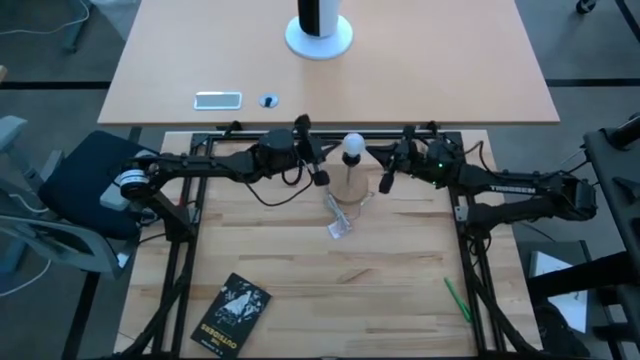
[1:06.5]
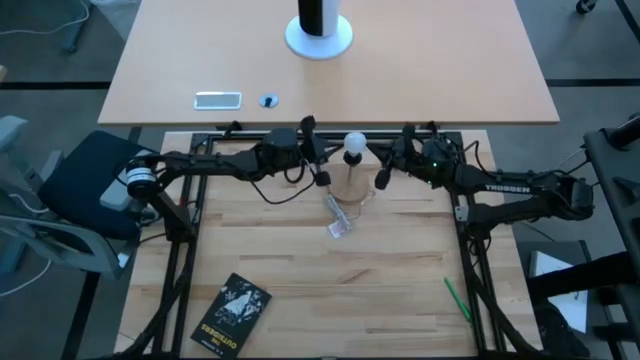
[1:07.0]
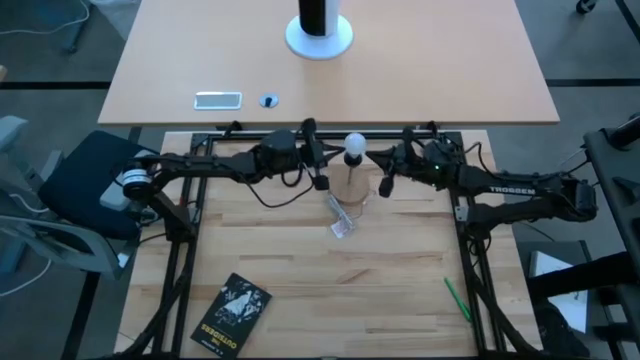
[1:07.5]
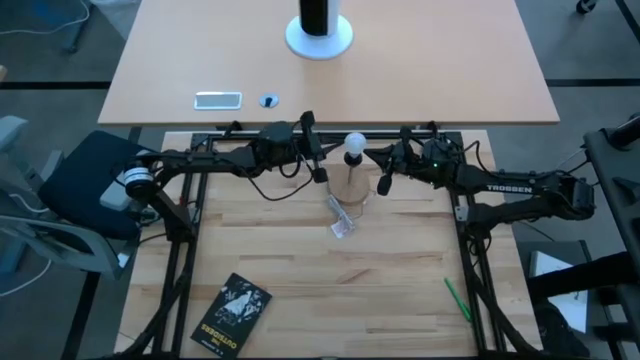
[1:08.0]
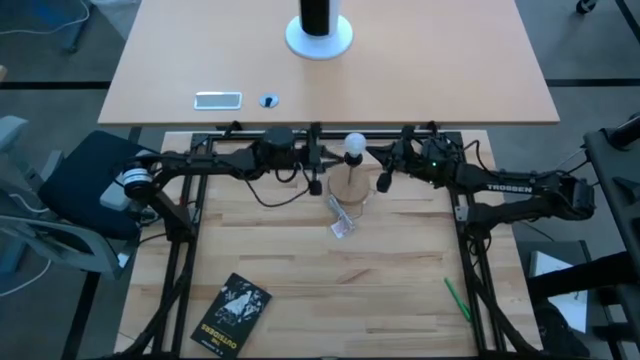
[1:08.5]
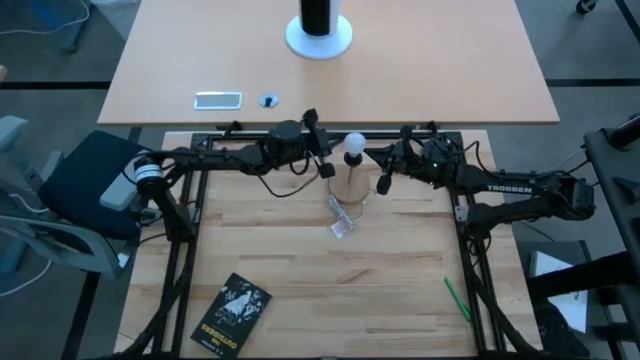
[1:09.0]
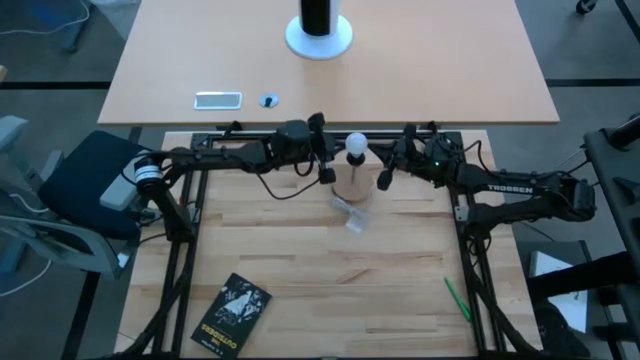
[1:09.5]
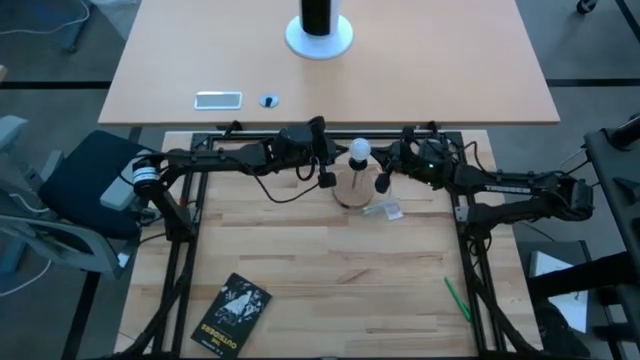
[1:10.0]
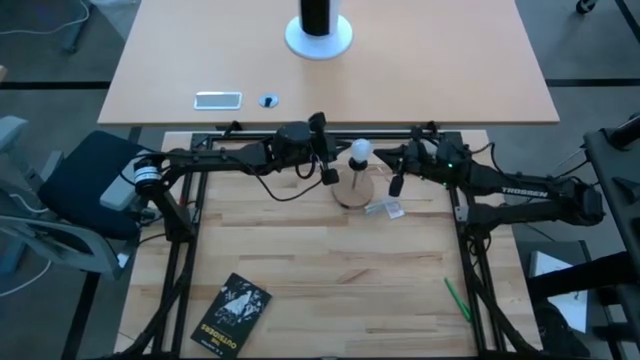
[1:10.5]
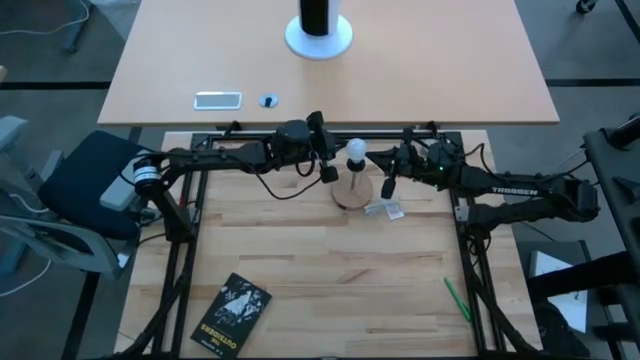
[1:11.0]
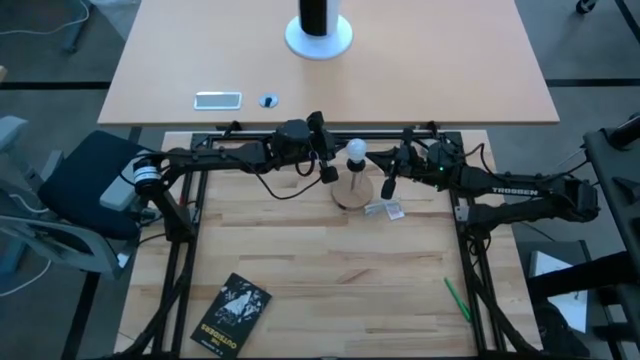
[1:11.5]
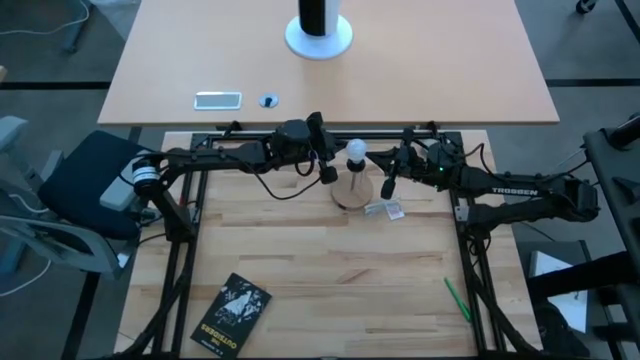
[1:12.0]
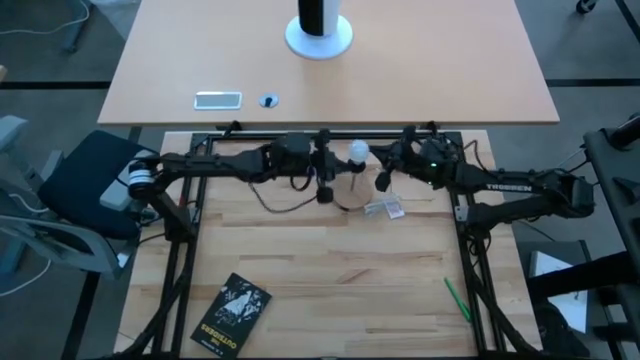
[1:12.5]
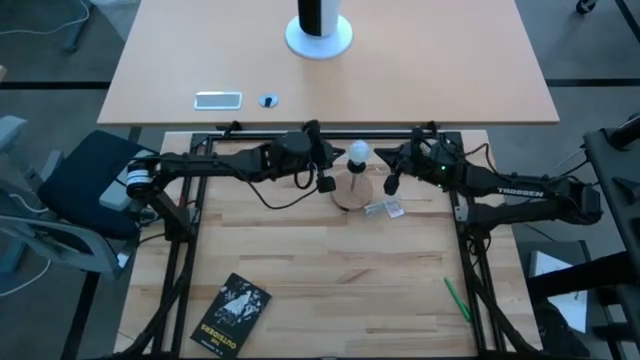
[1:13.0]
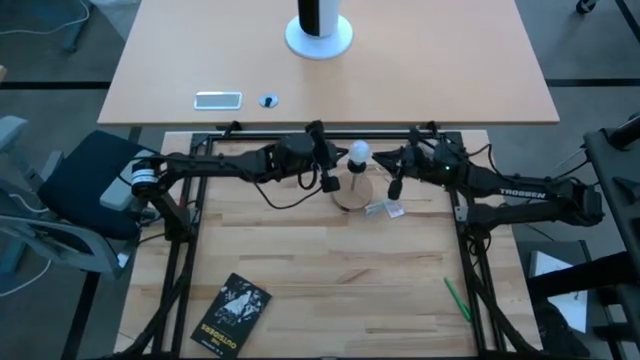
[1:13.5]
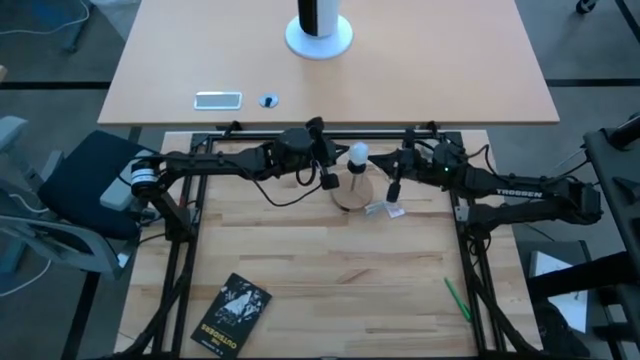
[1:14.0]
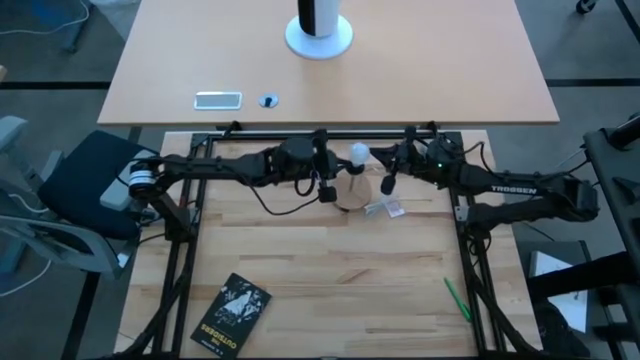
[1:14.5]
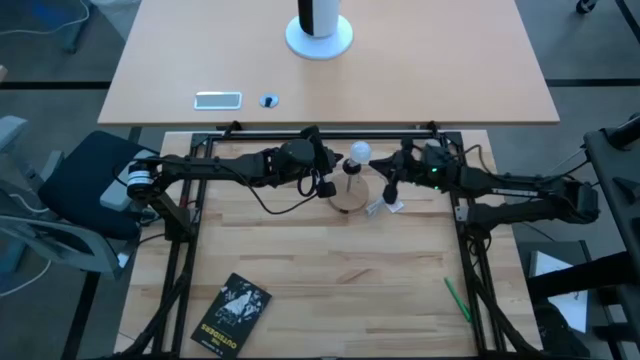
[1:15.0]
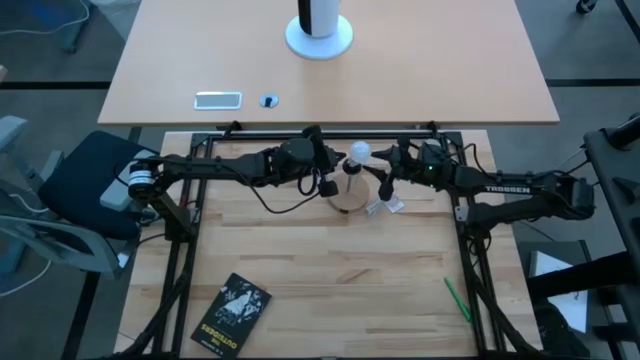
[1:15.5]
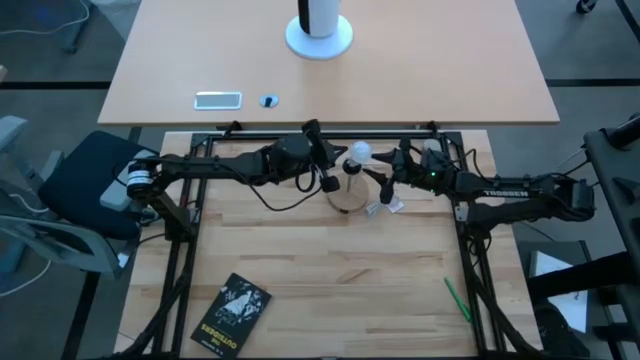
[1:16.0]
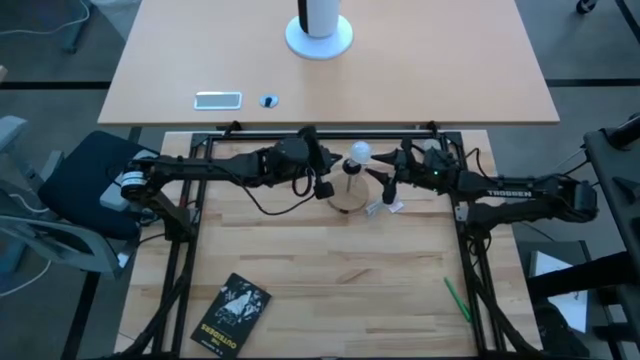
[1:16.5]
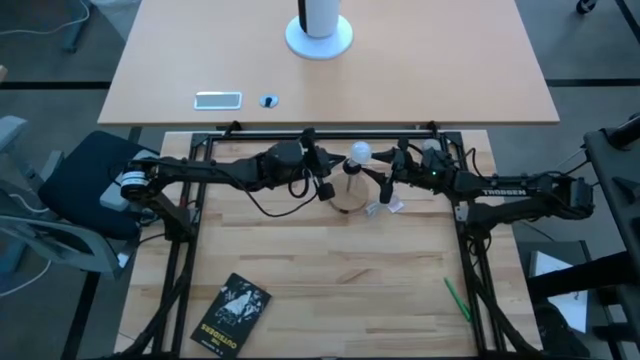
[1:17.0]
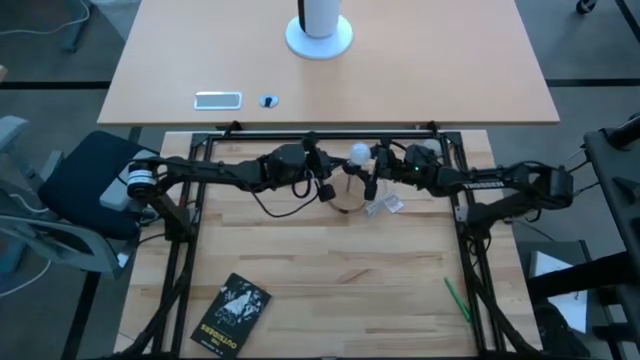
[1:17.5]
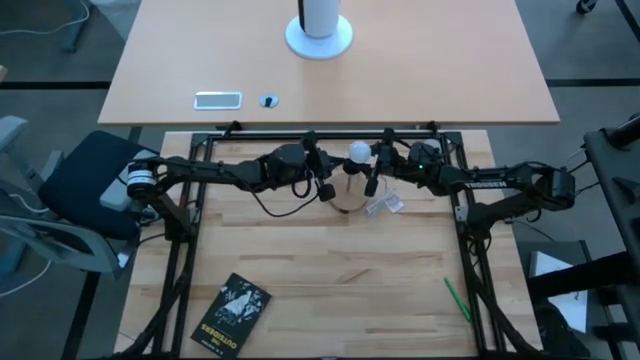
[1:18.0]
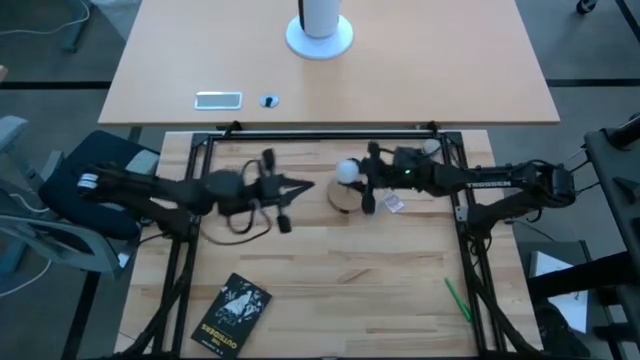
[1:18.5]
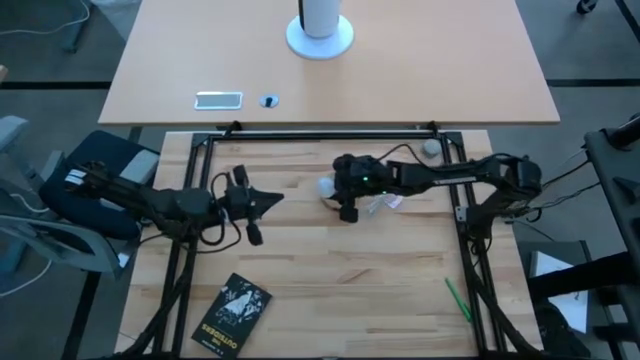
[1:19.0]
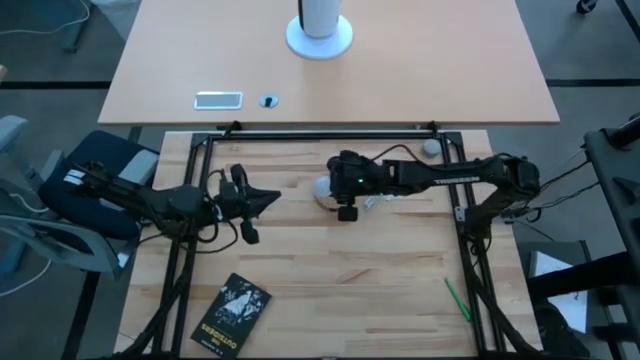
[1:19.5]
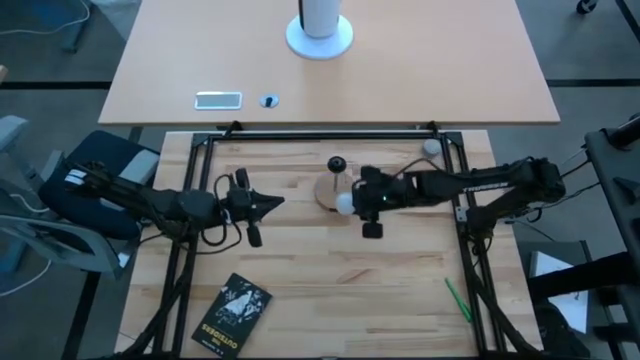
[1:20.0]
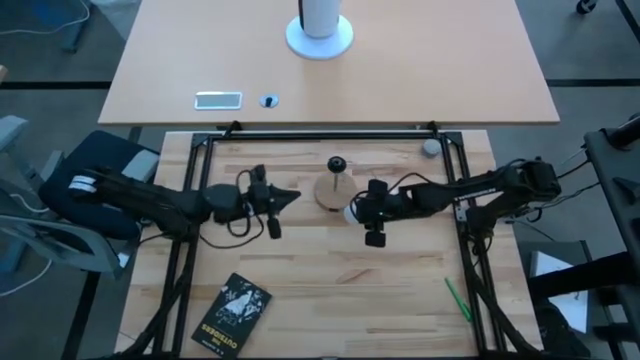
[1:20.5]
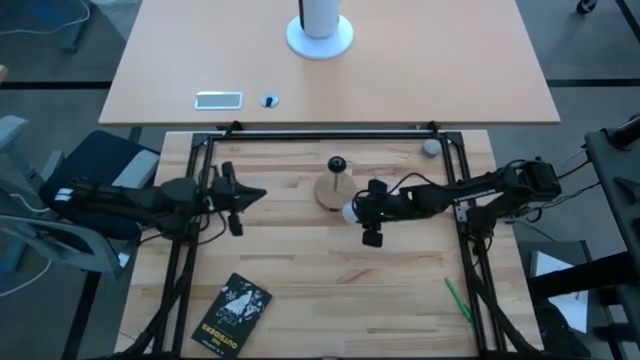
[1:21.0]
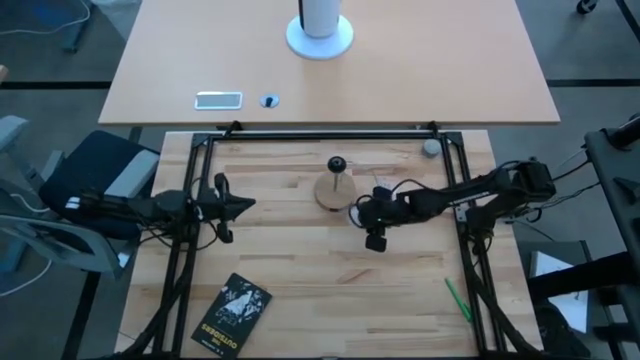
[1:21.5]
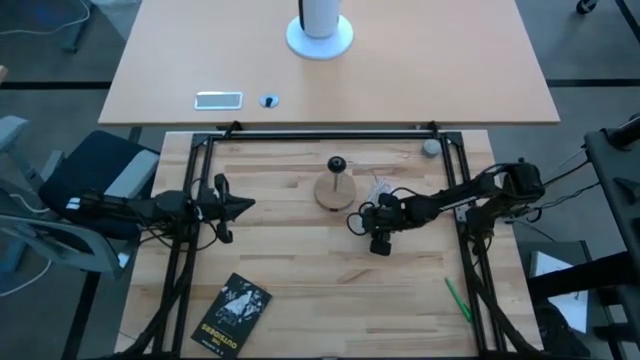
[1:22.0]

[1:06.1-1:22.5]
Task: Screw lightbulb
Remove the lightbulb from the lamp

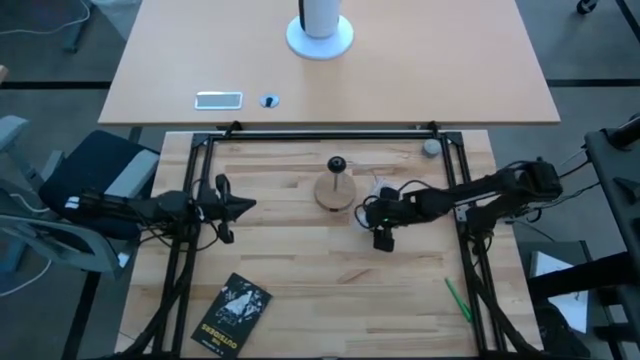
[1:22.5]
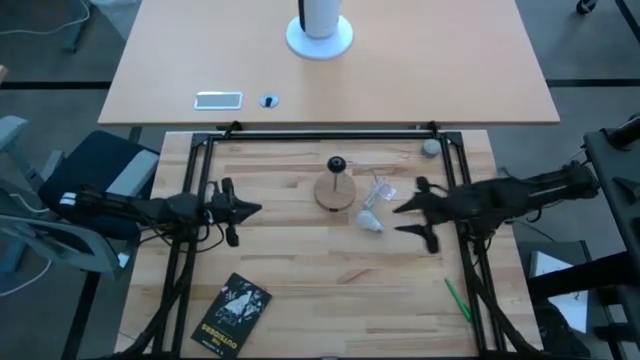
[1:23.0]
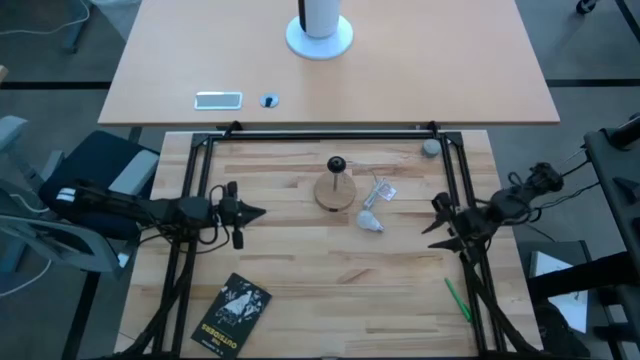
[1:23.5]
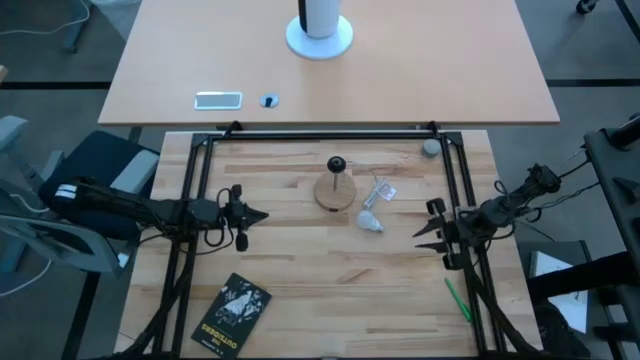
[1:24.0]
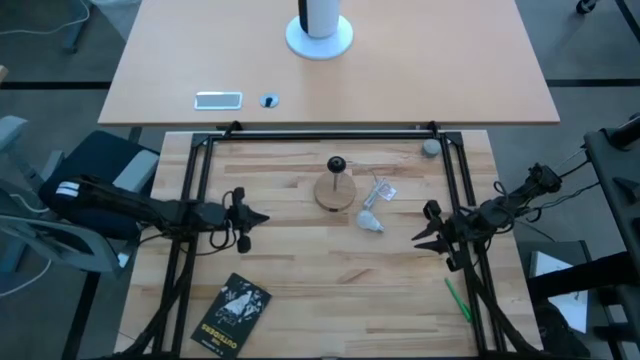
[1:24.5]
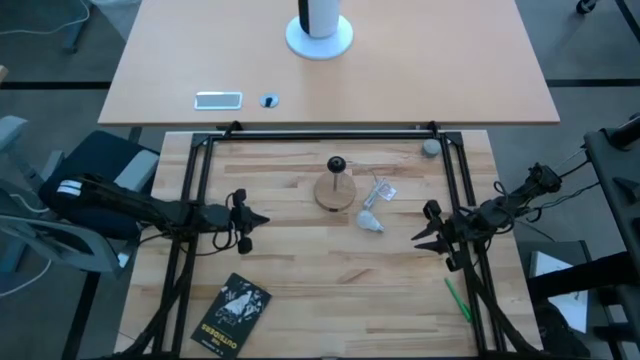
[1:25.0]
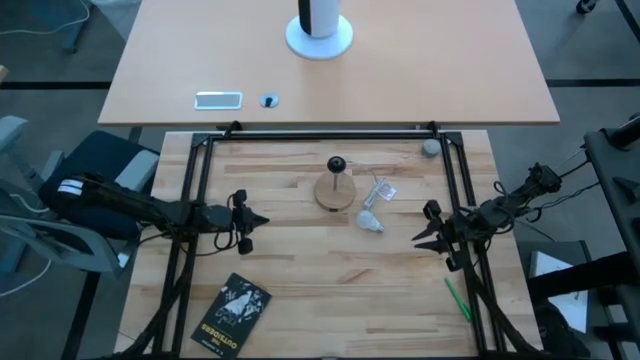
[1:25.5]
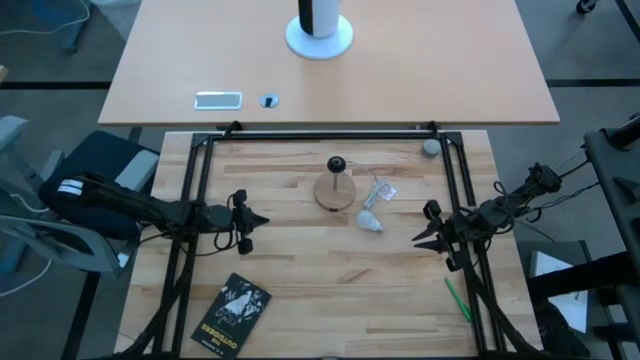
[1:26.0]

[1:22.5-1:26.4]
Return to Home Position

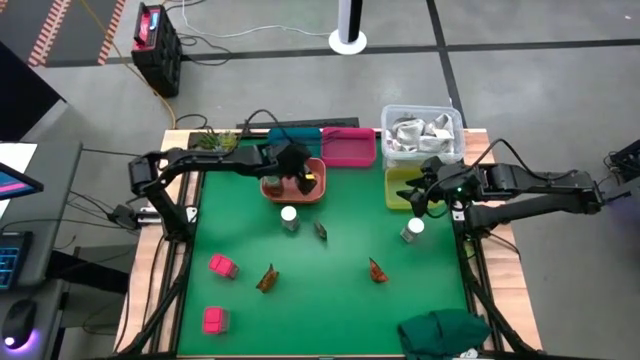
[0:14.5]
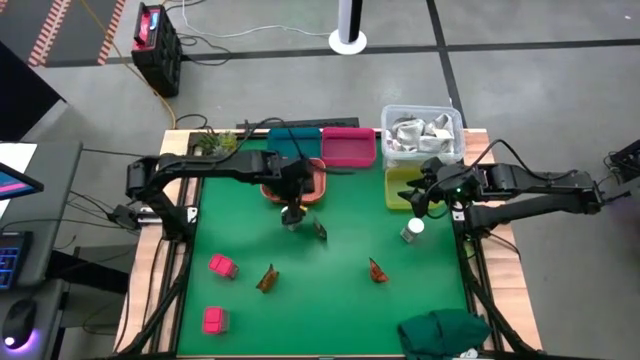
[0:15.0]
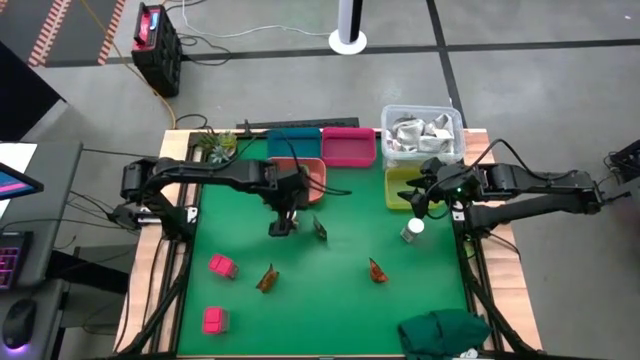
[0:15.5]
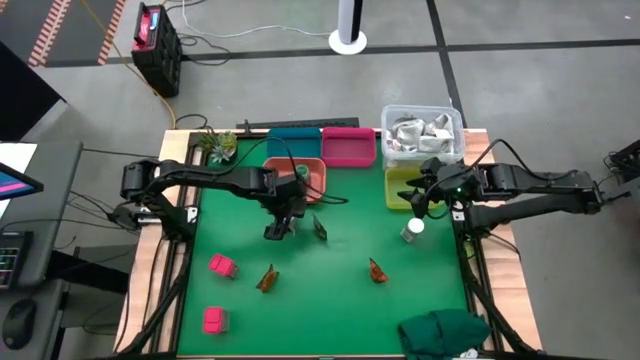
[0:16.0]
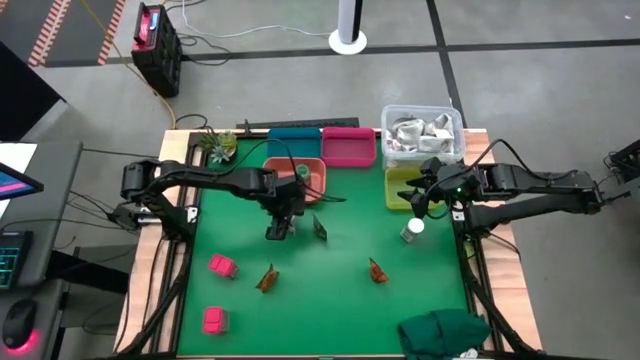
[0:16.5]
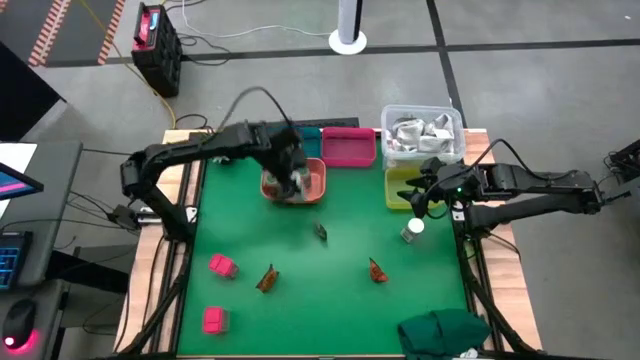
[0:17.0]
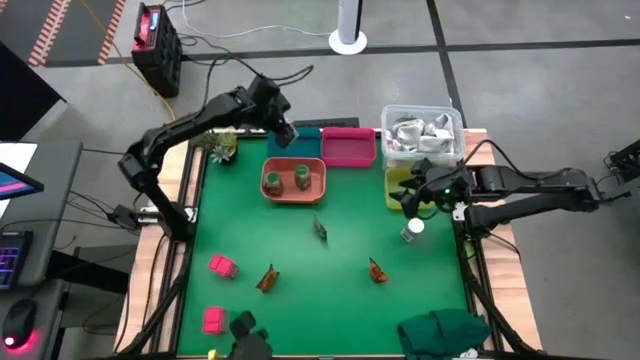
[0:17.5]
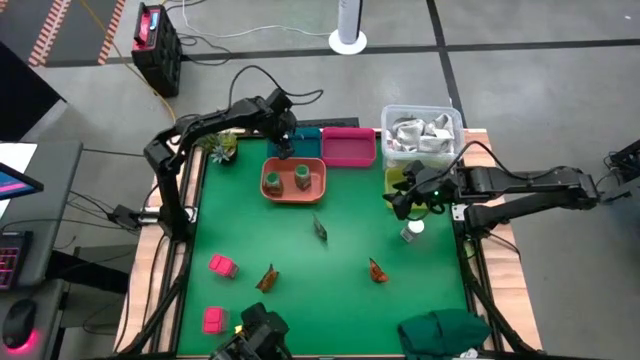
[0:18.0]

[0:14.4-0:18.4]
Task: Sort spices by type
Put the left white seasoning bottle into the blue bin
